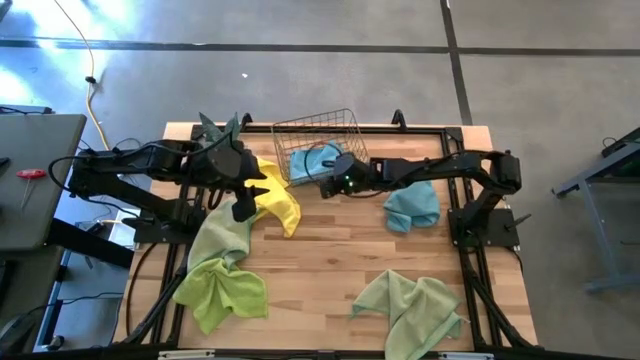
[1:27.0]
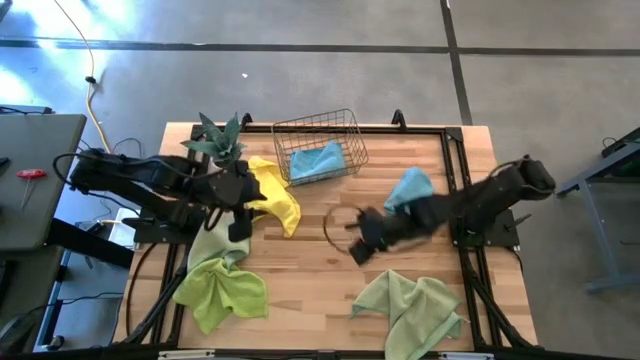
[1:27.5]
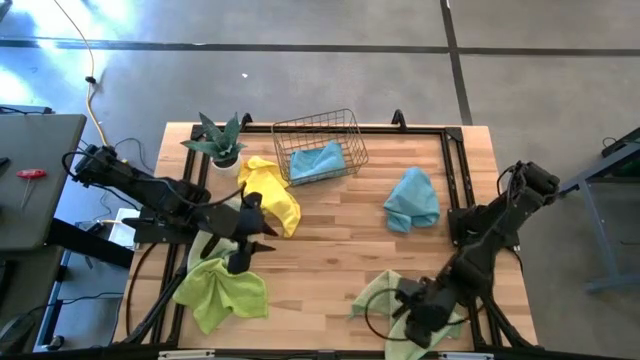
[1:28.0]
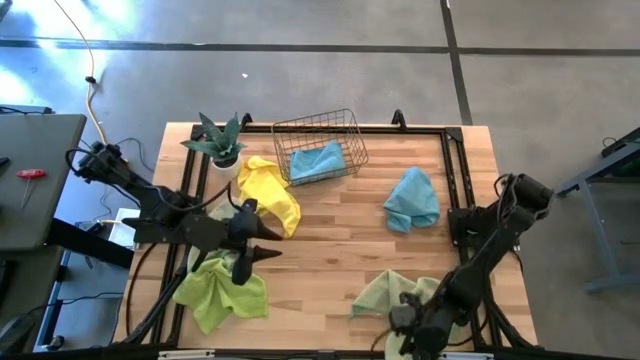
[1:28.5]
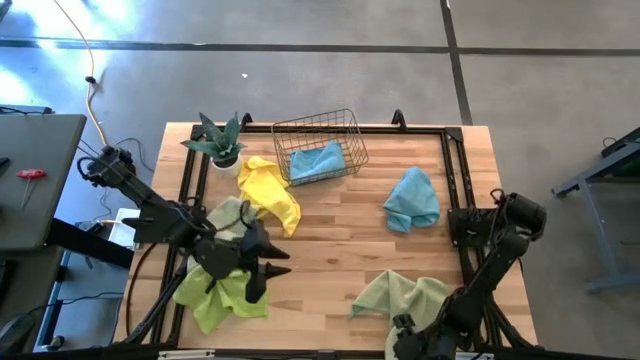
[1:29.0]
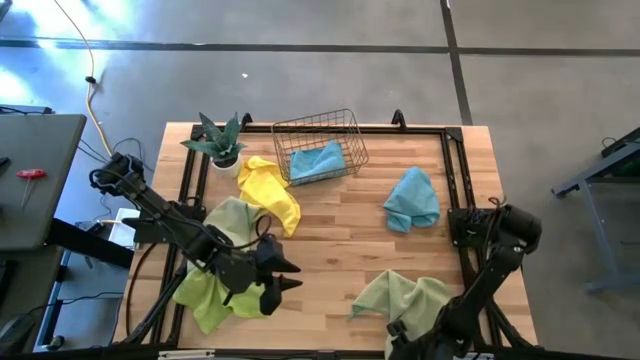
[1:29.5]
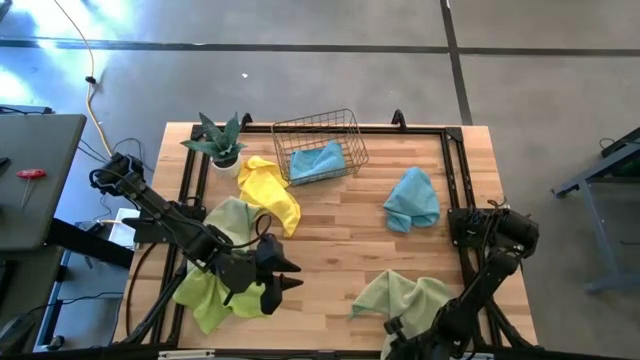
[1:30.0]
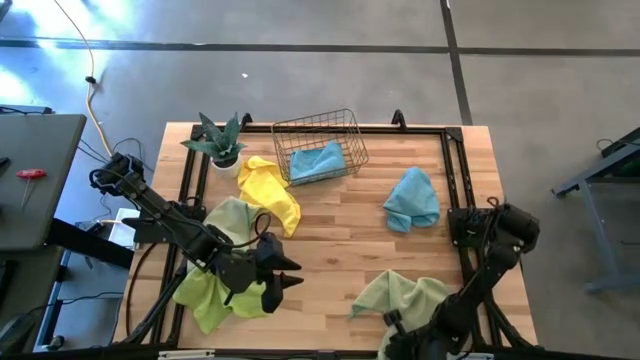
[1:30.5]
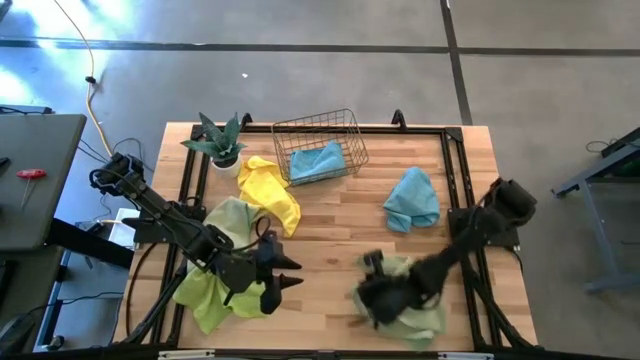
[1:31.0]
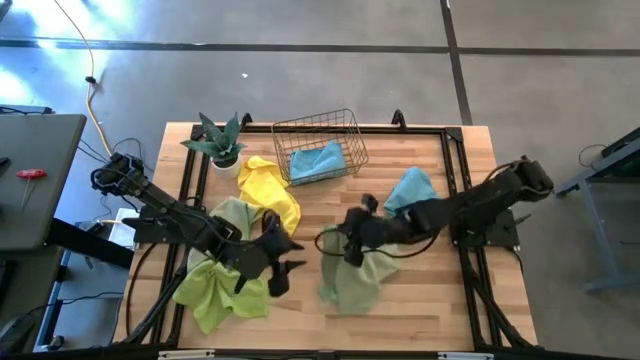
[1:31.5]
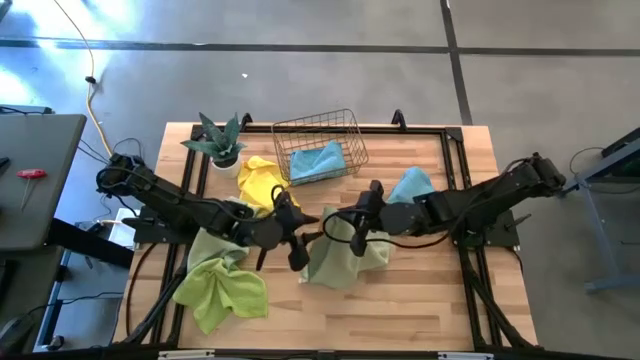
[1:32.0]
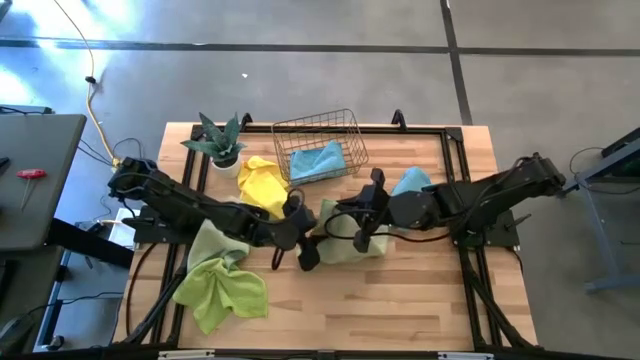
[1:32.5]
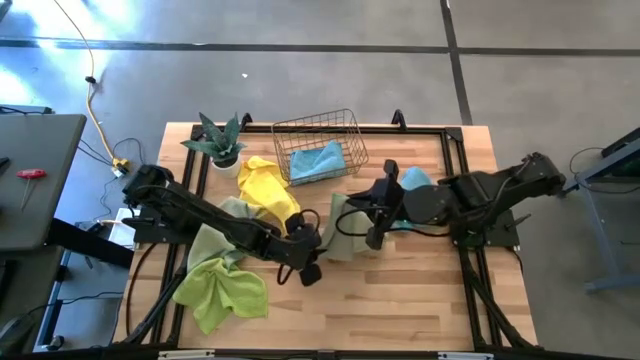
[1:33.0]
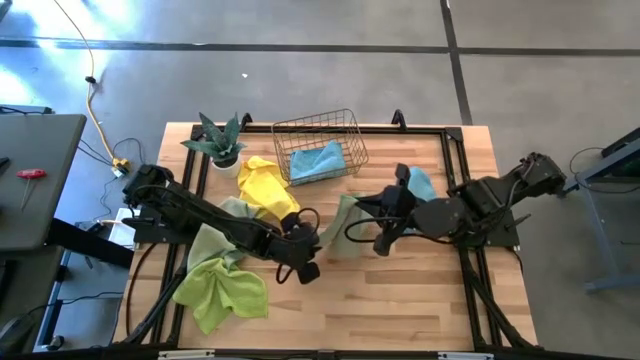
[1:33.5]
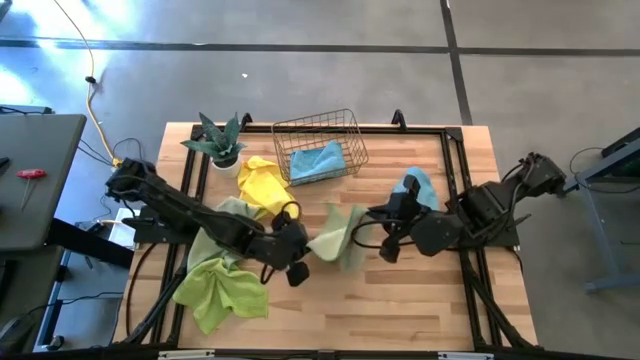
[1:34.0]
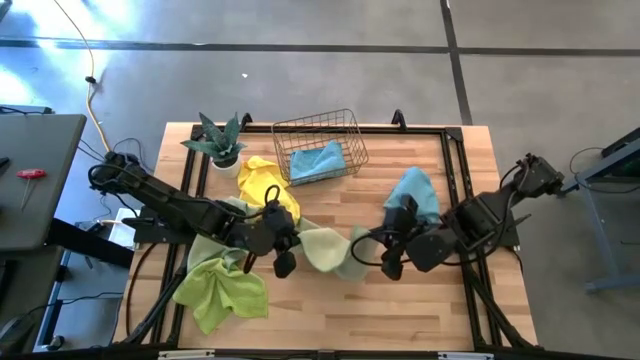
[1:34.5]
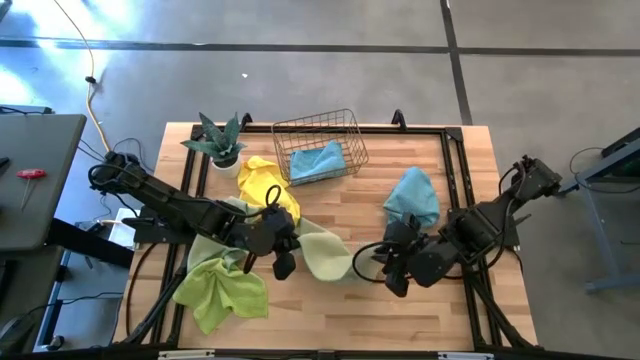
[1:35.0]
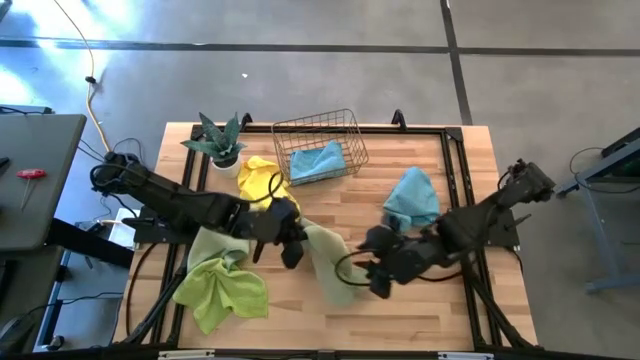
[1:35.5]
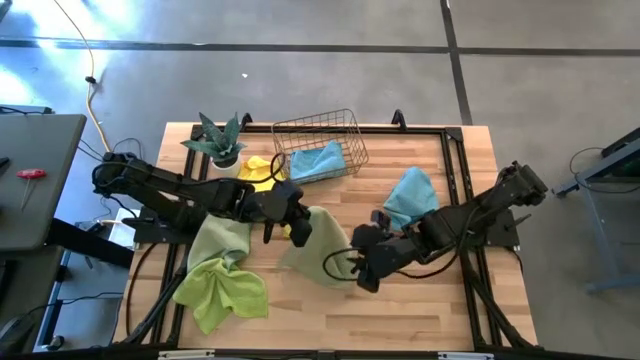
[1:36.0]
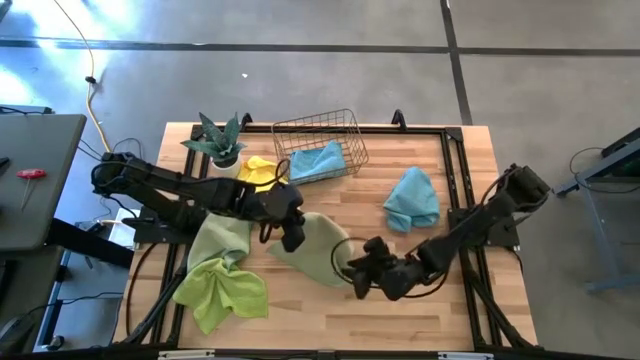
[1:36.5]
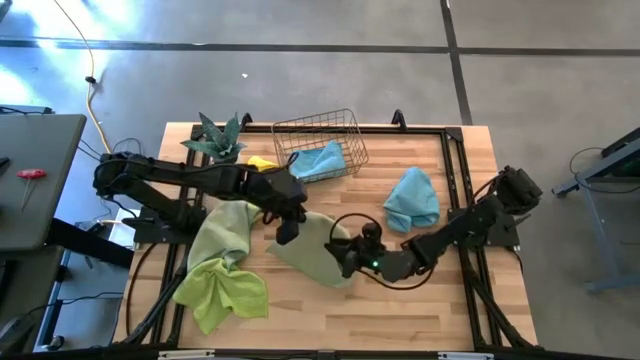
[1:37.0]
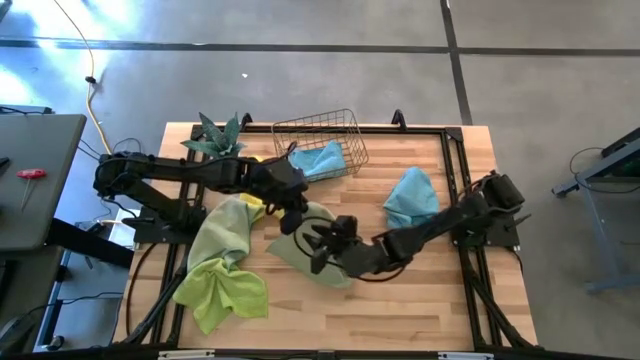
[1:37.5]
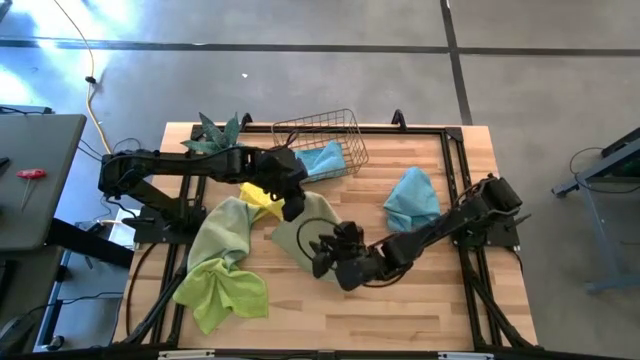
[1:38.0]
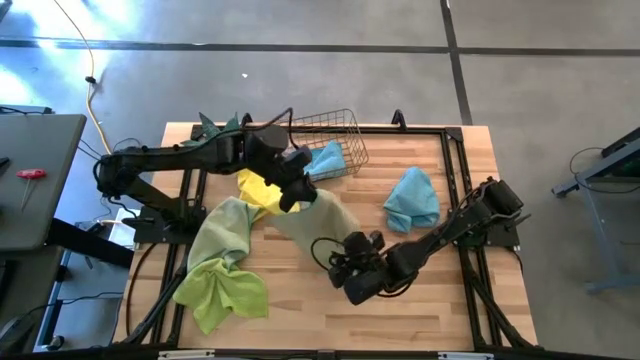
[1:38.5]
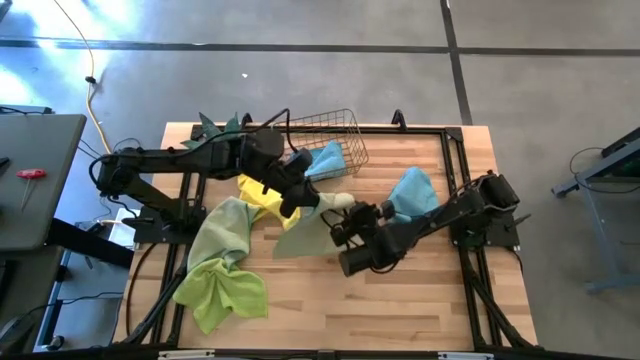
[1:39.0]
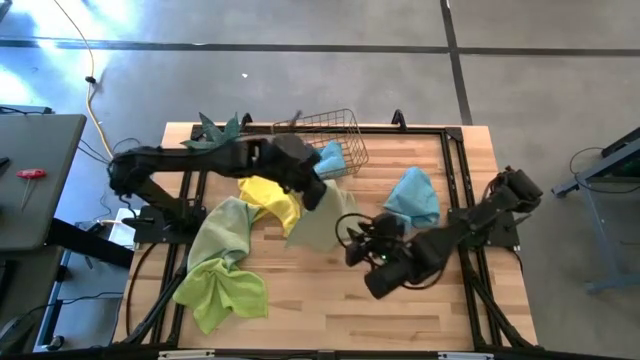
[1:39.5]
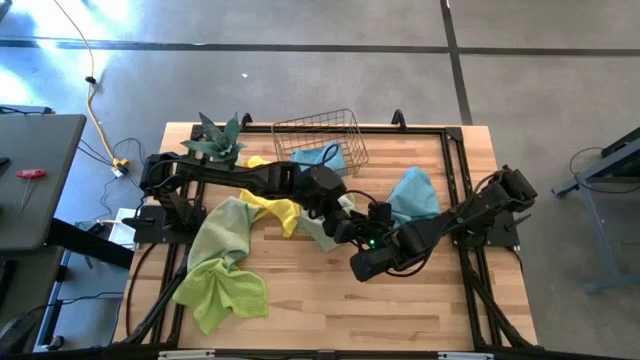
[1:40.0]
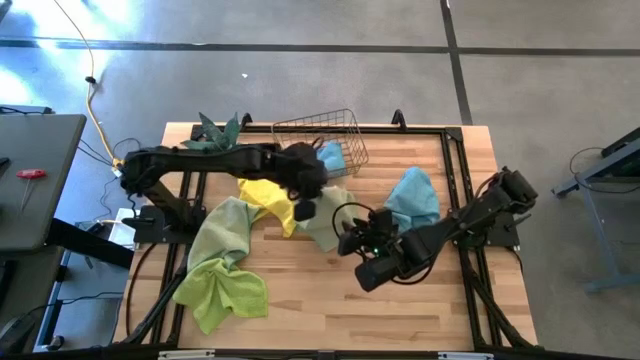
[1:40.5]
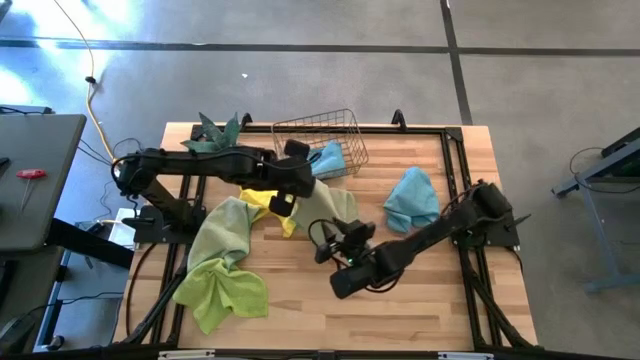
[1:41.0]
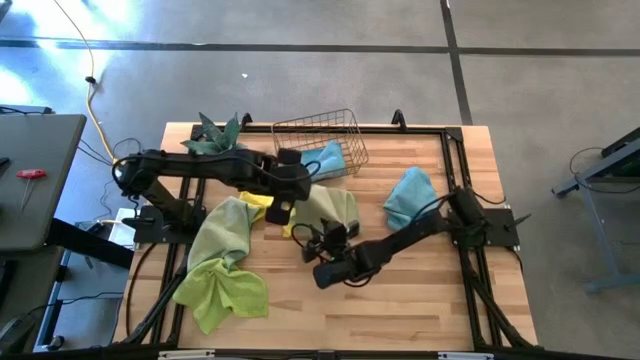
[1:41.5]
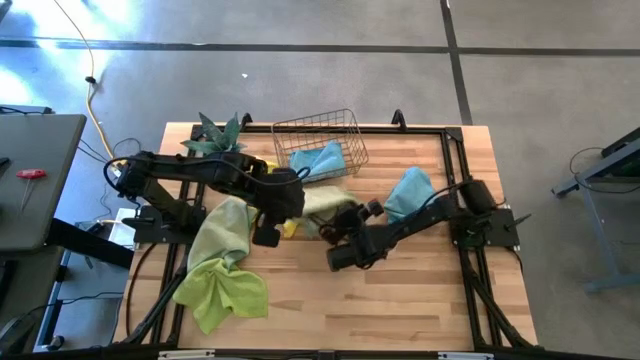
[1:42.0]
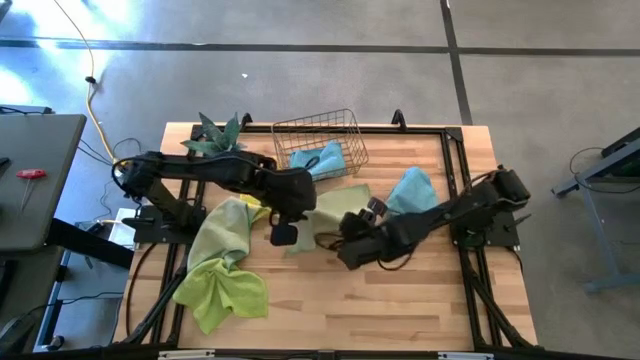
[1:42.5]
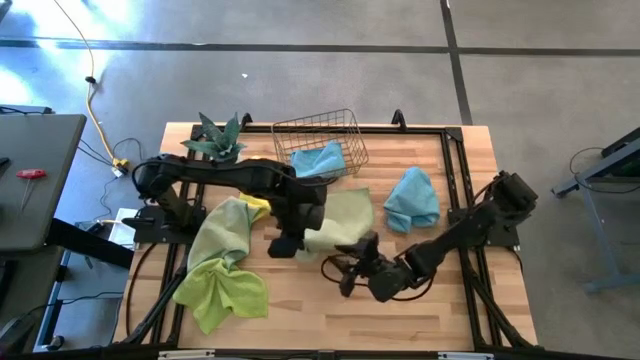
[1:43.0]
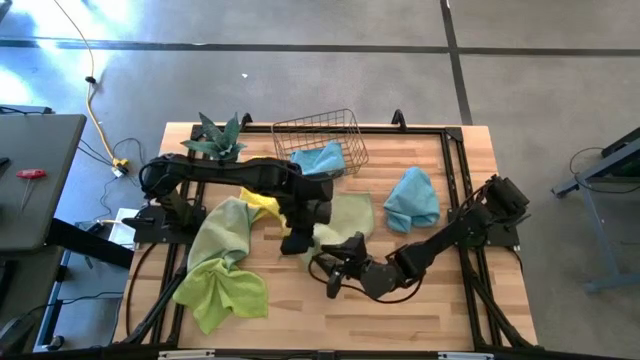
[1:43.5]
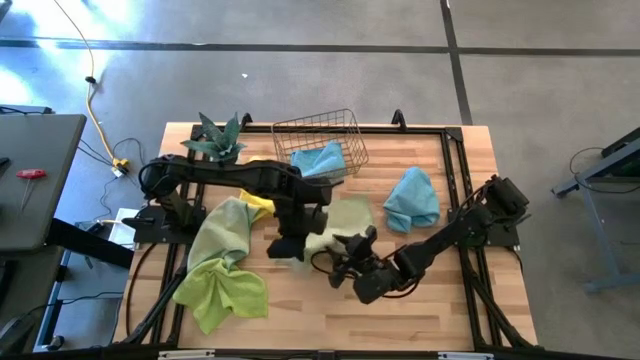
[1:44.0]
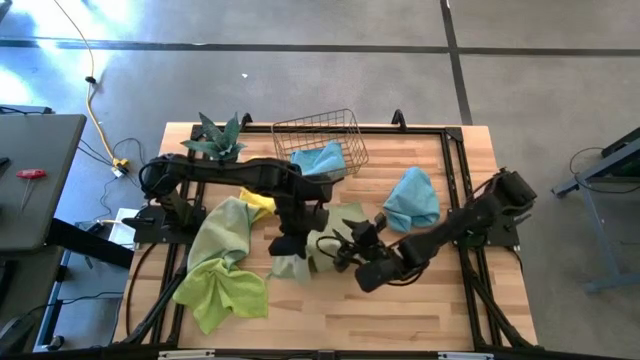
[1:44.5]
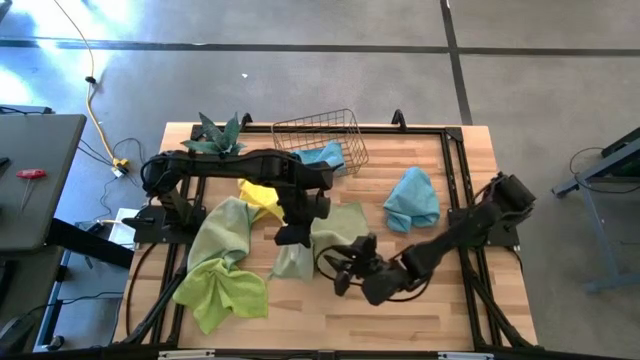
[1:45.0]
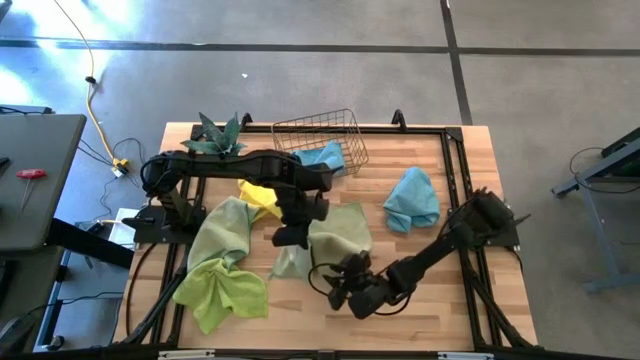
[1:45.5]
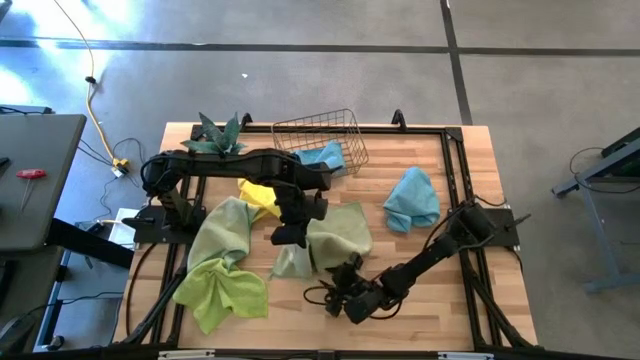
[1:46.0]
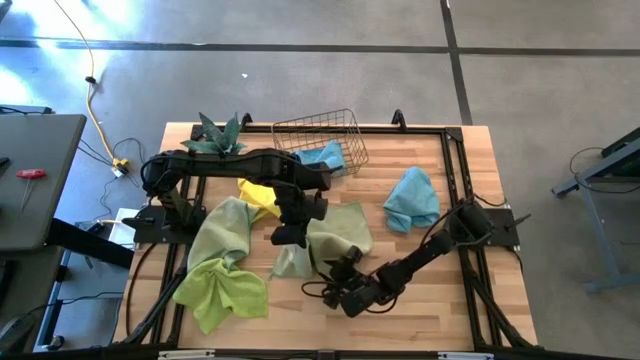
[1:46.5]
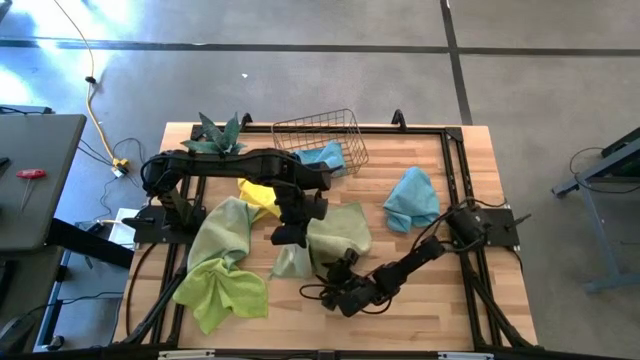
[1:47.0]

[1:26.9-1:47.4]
Task: Fold microfiber towels
Fold the right light blue microfiber cloth

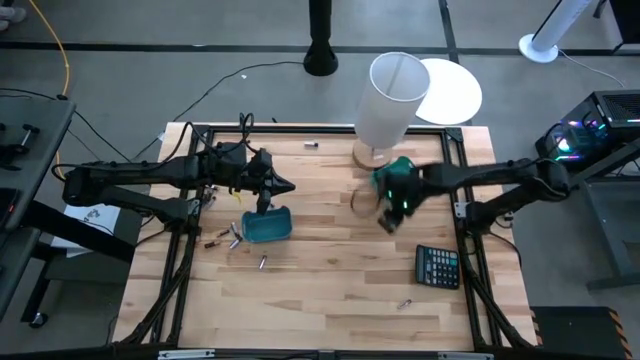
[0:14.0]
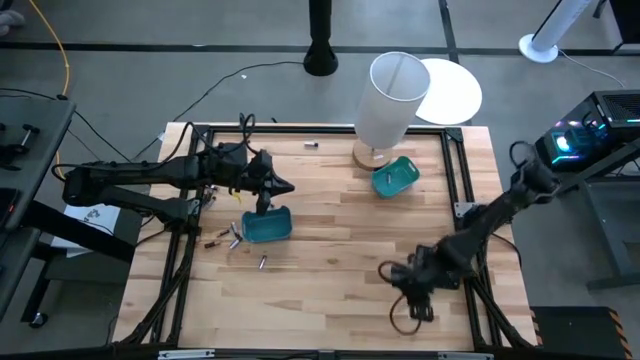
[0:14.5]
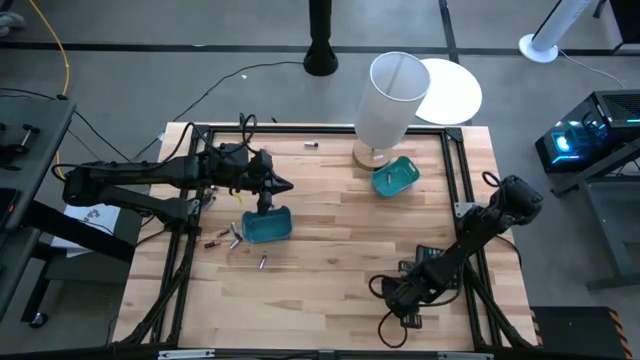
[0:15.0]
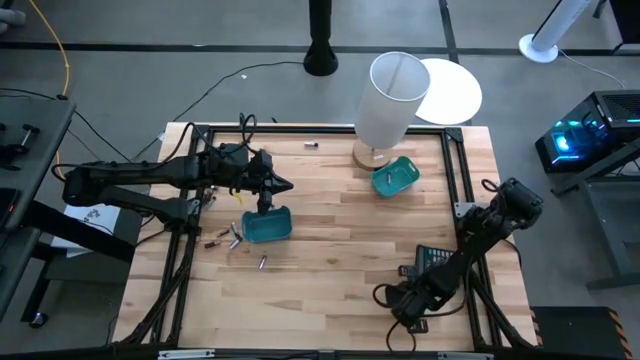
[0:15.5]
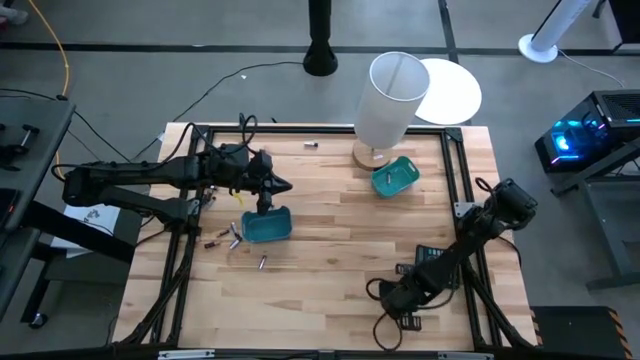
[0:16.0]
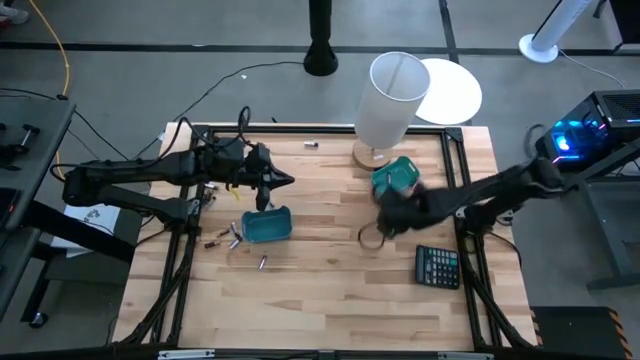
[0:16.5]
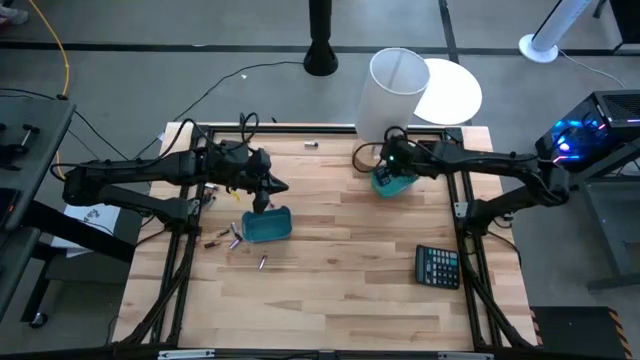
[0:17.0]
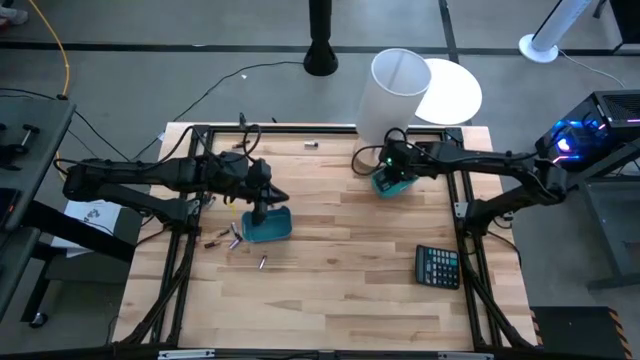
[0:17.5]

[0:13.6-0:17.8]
Task: Sort batteries
Put the silver battery into the green bin
